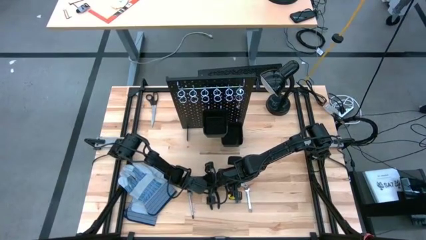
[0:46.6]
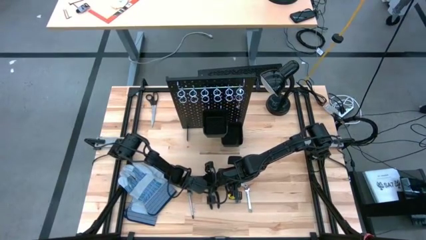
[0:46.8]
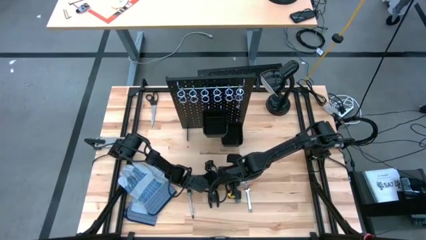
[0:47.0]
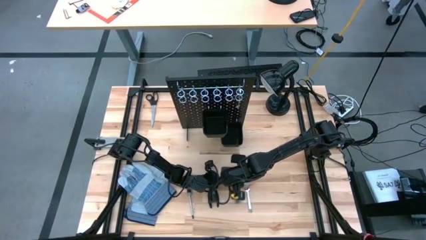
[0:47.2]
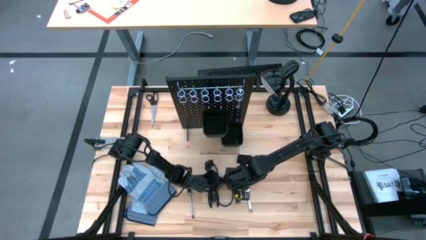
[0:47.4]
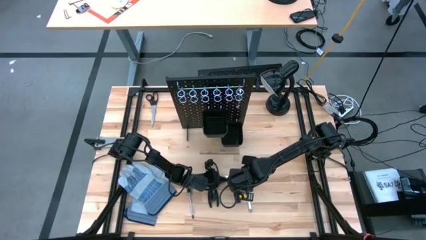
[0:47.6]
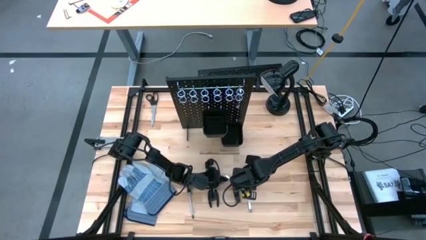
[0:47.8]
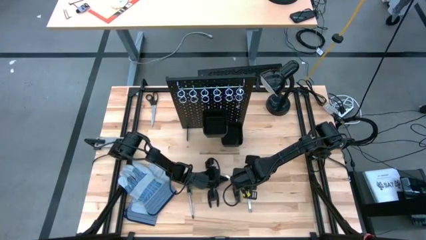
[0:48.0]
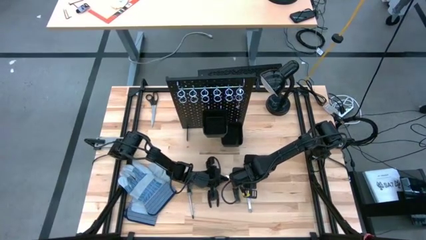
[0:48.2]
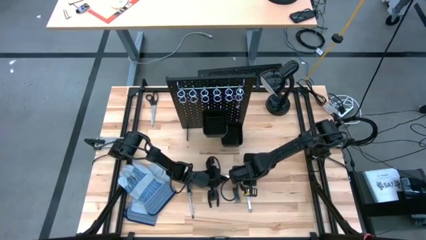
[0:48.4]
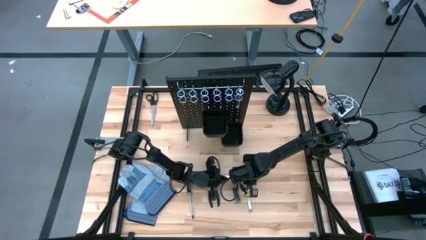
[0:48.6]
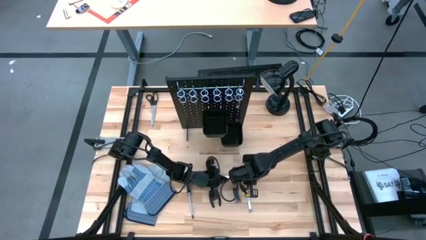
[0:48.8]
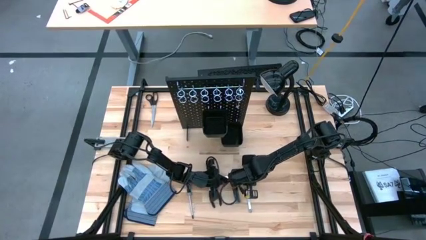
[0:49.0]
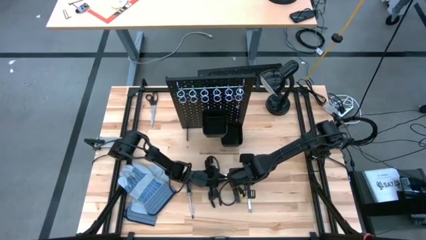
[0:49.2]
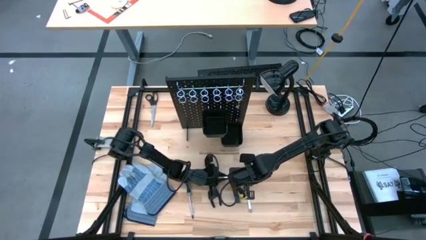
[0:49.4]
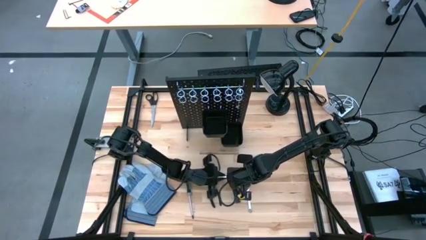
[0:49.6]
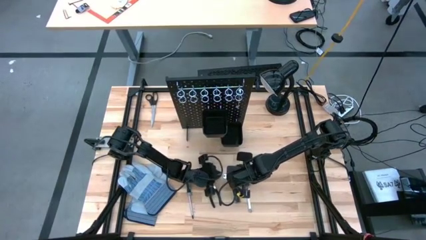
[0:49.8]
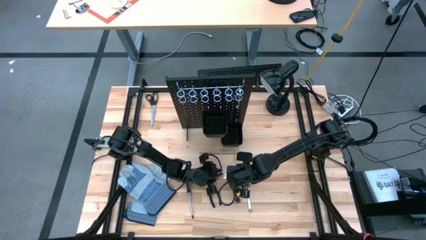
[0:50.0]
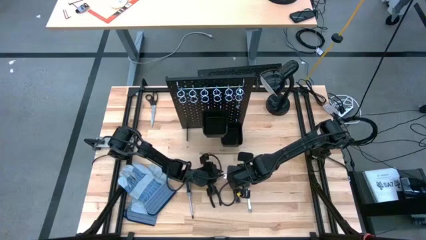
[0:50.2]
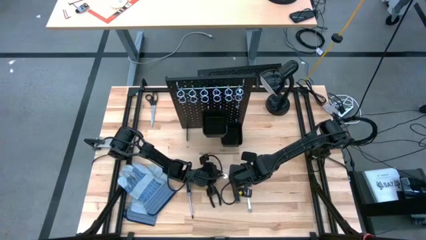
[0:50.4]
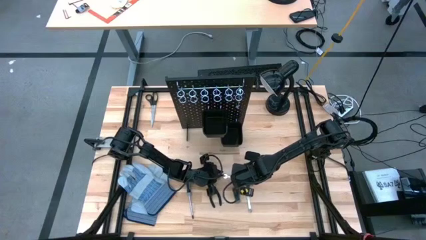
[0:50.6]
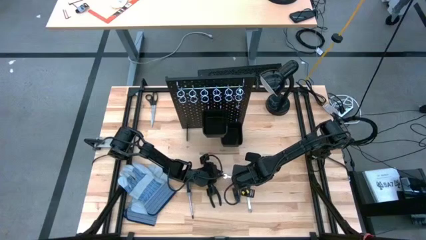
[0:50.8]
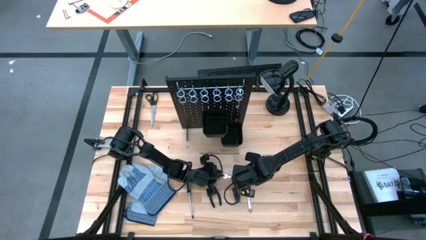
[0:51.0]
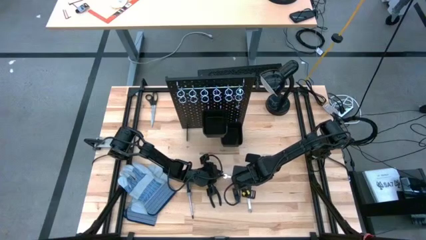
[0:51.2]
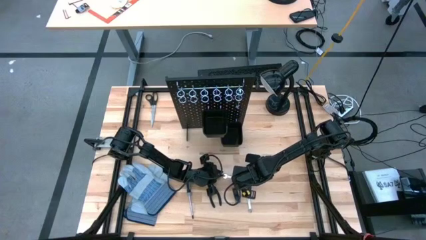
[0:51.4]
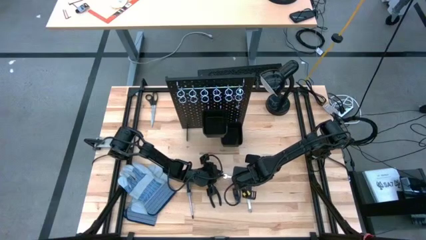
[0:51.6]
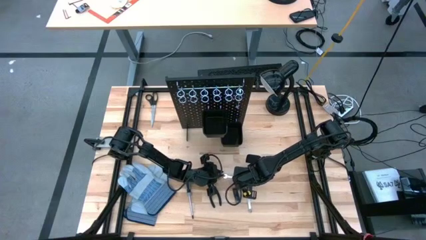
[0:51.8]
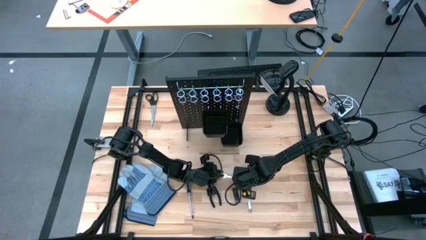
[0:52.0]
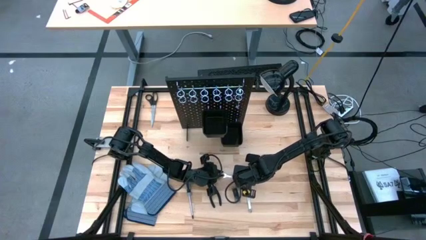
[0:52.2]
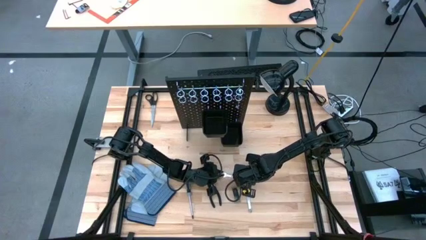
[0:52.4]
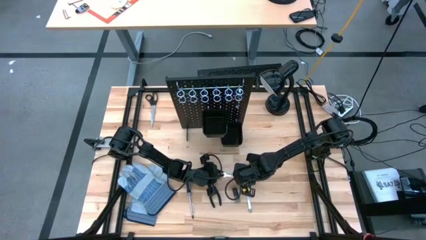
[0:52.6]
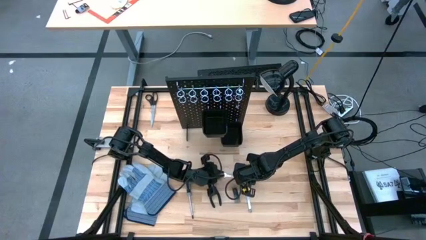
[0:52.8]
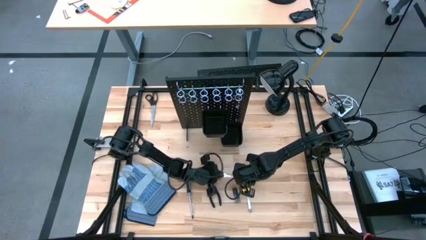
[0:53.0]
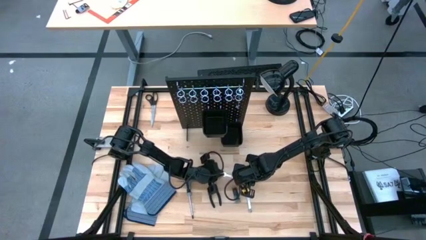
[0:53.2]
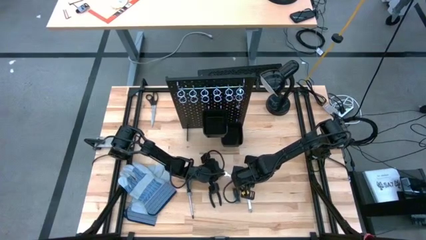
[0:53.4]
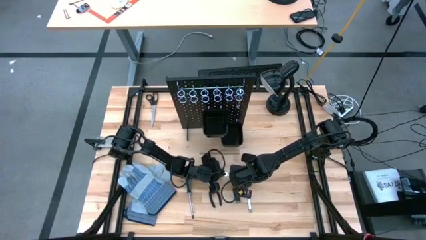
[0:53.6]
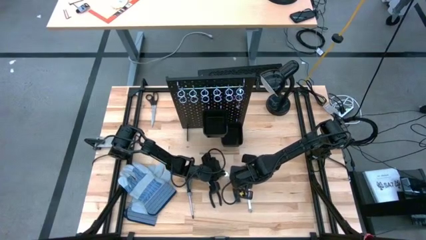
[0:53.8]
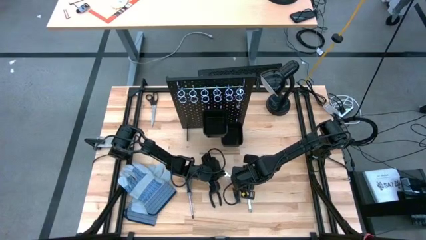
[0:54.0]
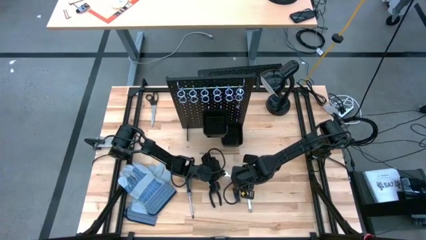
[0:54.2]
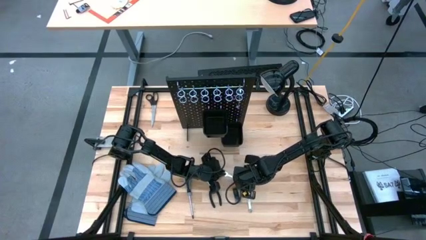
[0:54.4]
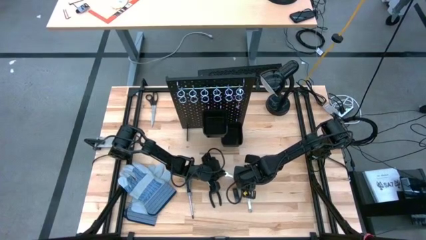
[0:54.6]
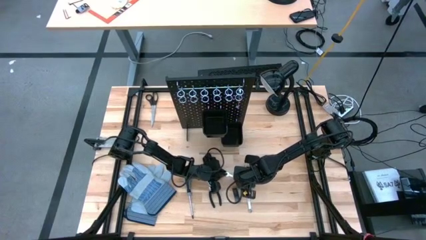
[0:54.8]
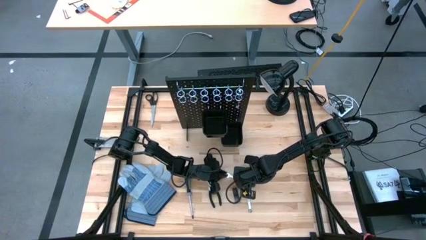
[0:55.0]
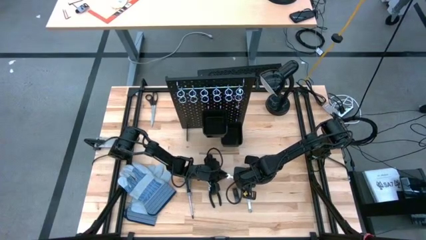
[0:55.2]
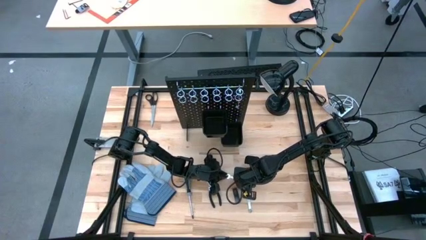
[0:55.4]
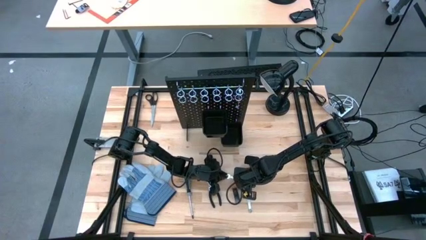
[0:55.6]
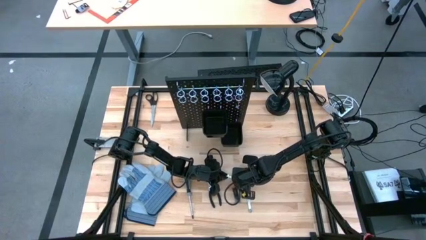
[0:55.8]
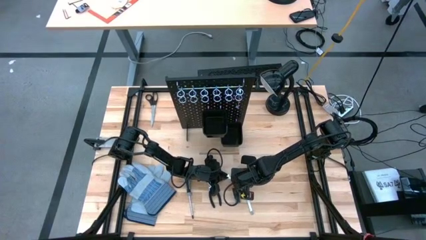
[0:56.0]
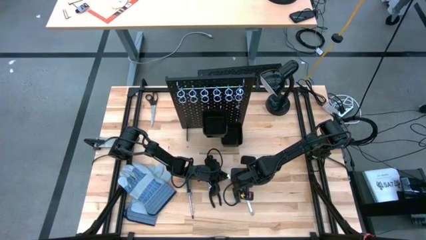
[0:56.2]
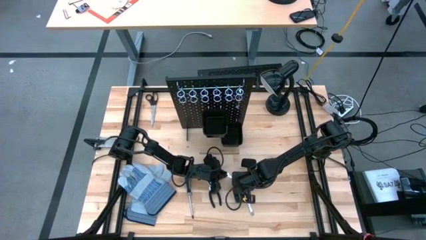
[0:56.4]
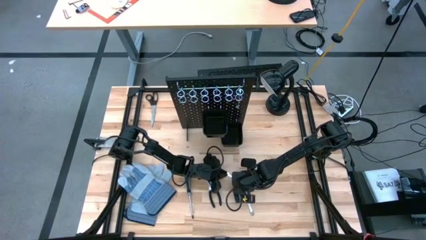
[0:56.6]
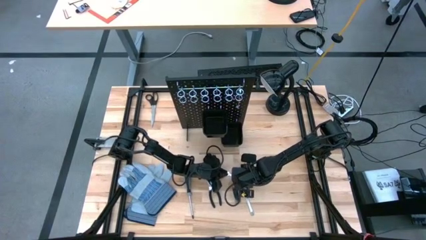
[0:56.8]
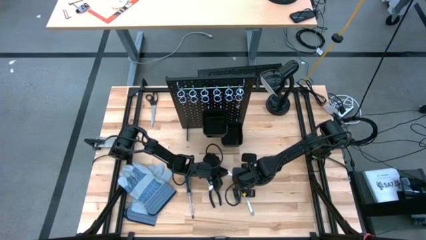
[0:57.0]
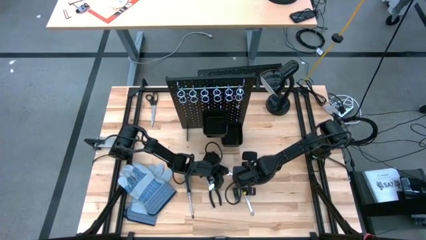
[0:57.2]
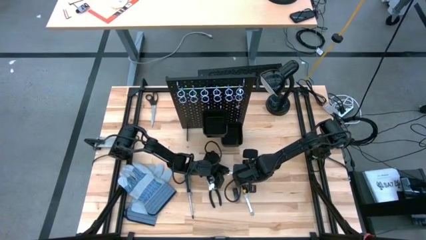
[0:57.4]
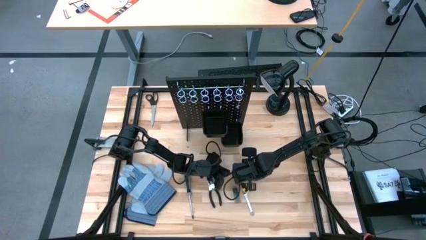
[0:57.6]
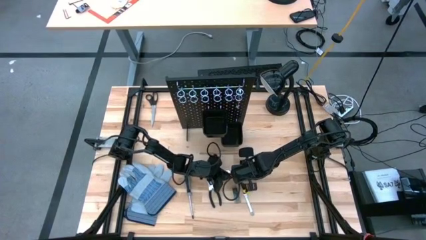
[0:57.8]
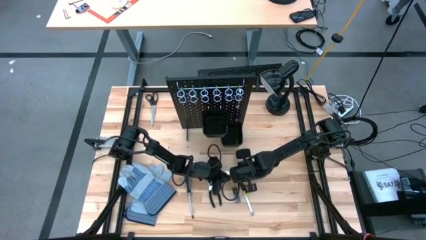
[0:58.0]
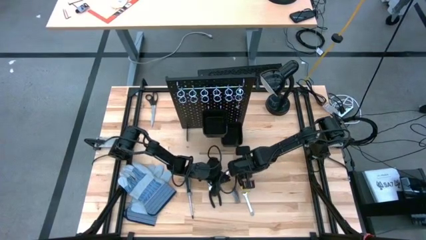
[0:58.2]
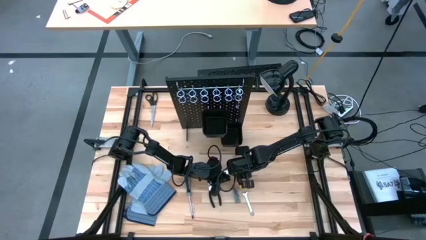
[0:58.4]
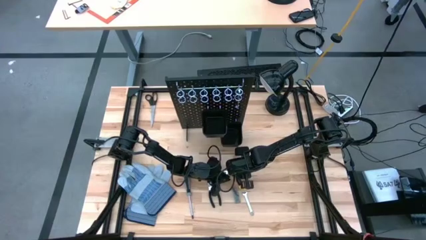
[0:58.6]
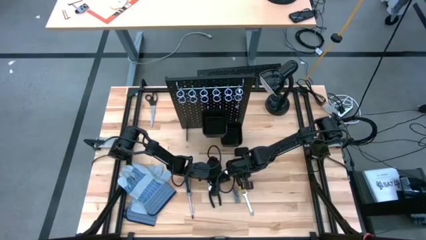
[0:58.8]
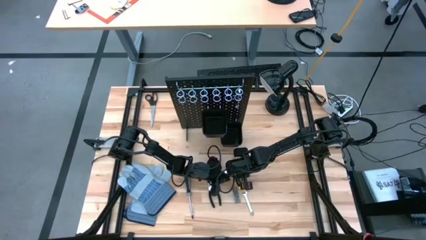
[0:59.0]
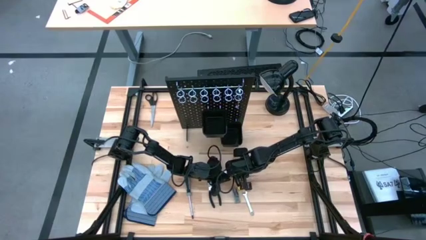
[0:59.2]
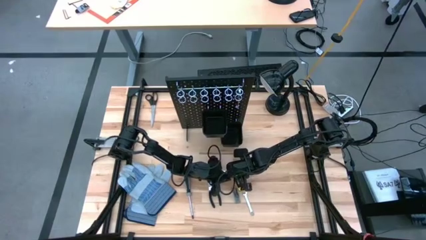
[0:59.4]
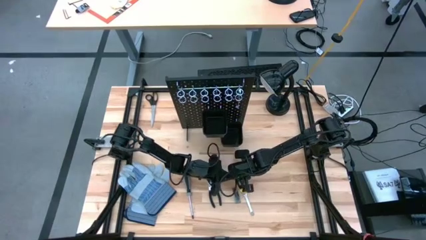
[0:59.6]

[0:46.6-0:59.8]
Task: Hang tools onto peg board
Hang the right silver wrench on the black pegboard

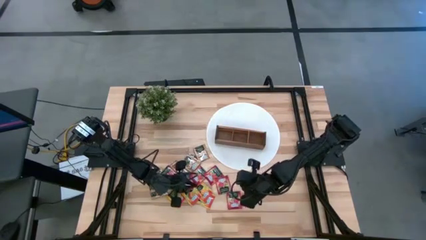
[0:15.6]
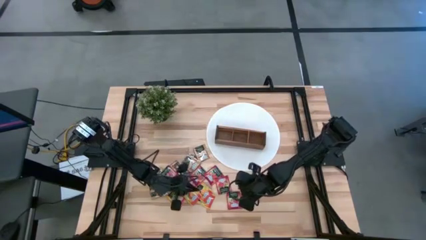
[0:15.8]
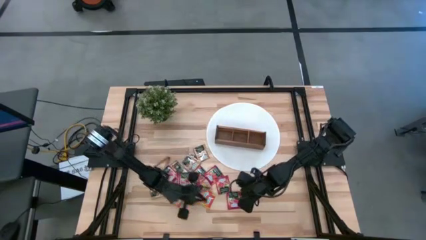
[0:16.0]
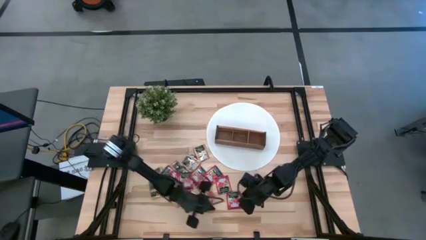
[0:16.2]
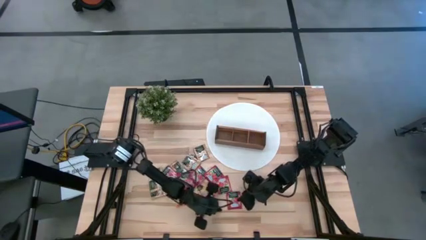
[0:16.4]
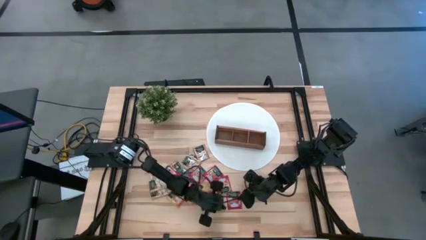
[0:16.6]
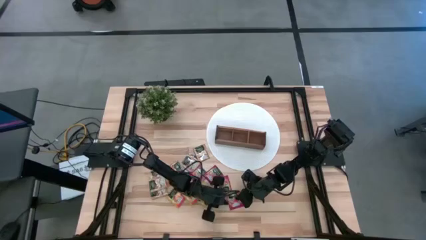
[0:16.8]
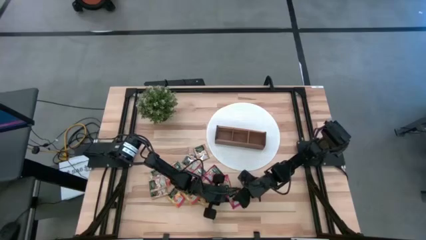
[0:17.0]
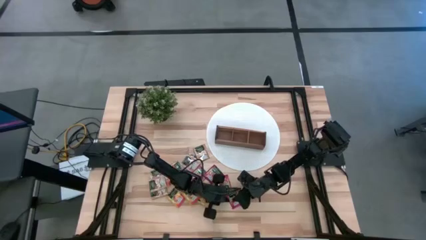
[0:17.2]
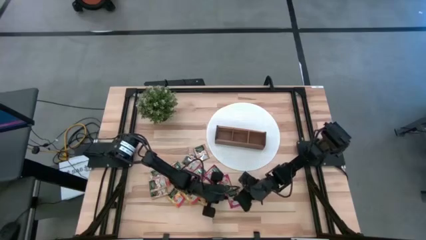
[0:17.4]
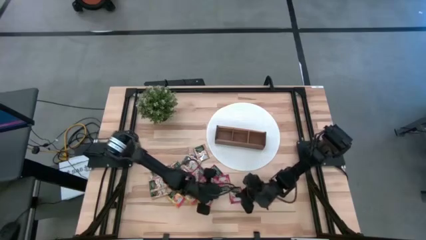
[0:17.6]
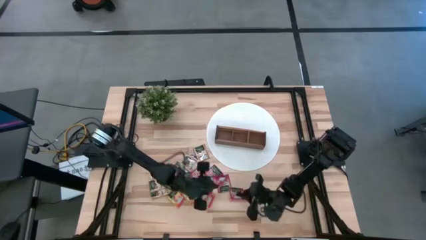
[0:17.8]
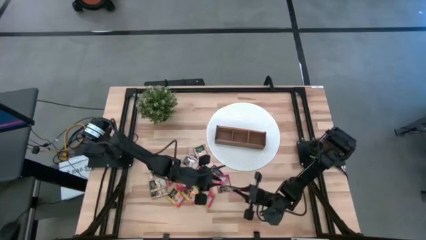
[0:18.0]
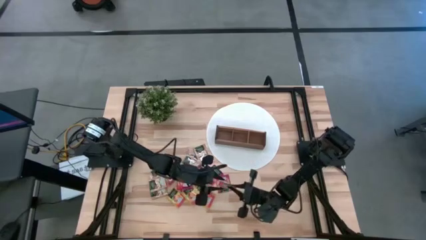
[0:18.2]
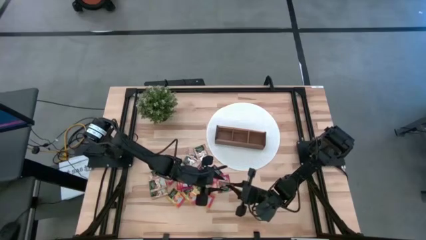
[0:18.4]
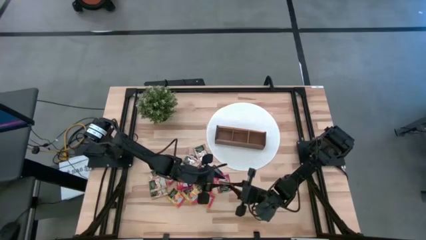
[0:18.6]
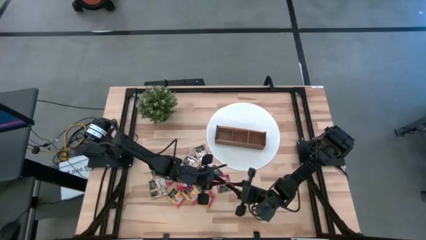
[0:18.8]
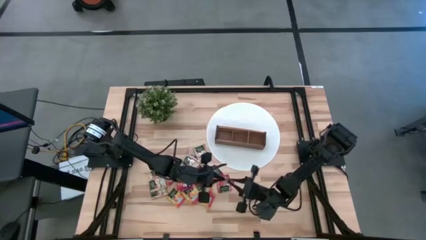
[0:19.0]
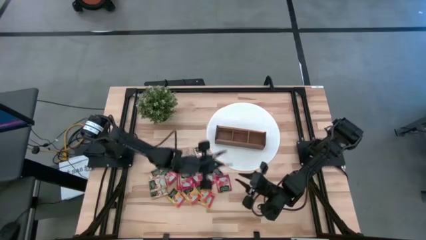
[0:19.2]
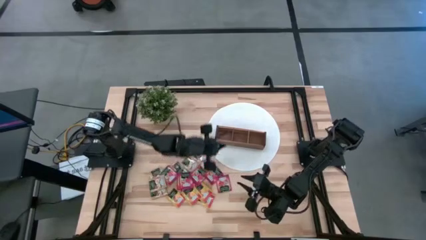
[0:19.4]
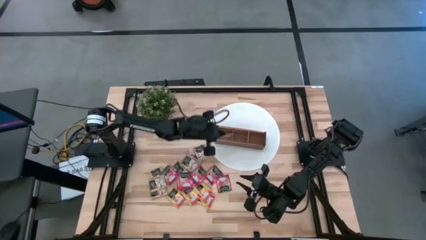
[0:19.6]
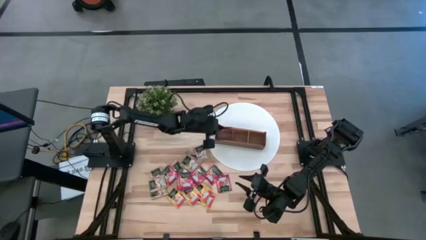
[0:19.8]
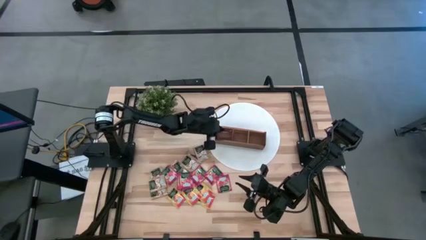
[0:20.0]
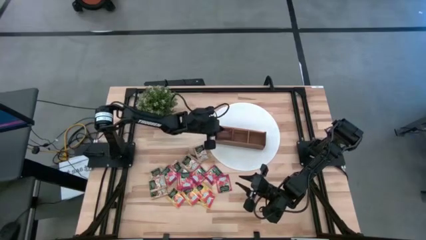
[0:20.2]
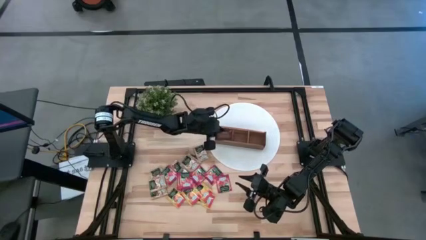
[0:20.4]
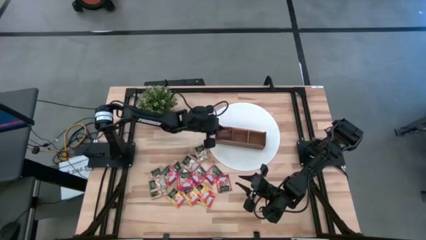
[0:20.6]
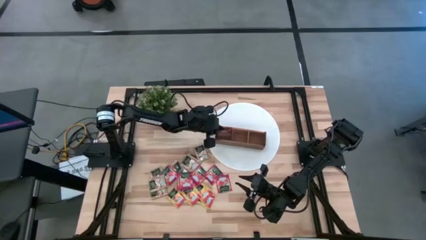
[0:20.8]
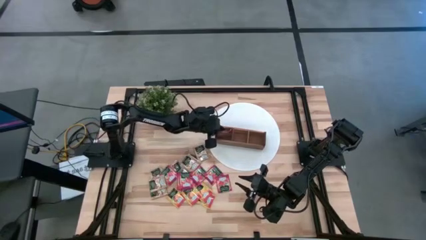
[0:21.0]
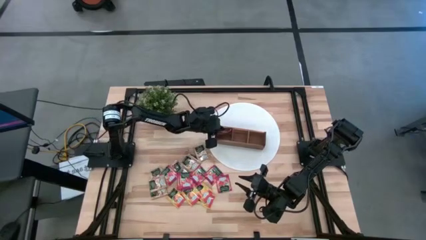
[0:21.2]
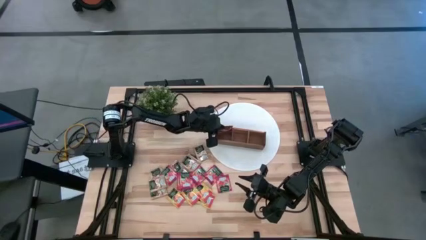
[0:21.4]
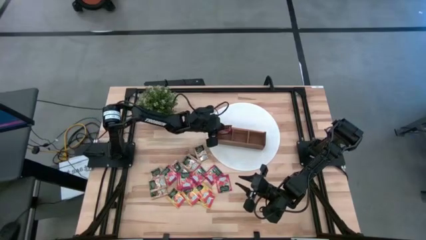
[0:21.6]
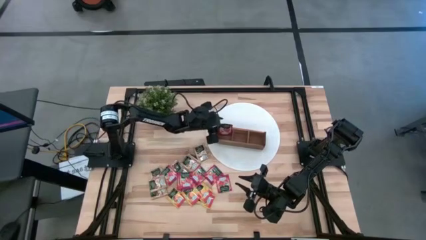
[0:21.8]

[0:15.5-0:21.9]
Task: Pick & Place Tea
Put the red tea bag into the left section of the wooden organizer
